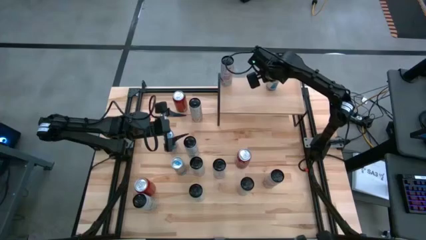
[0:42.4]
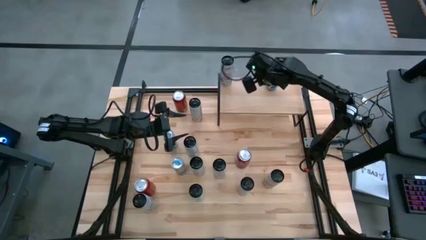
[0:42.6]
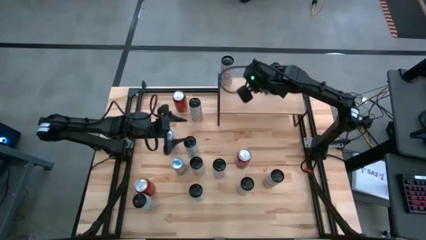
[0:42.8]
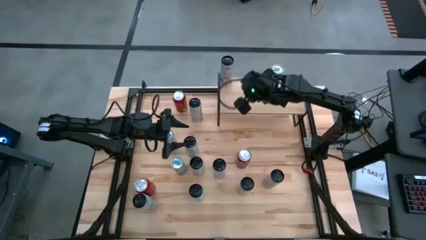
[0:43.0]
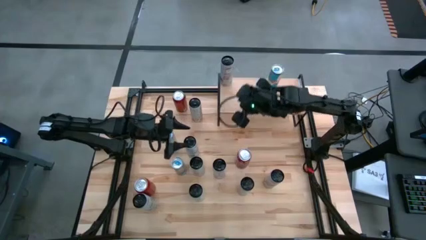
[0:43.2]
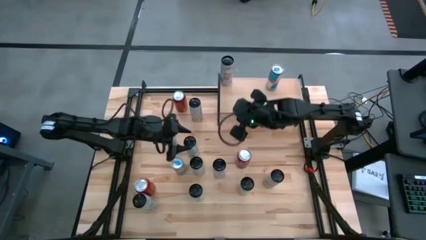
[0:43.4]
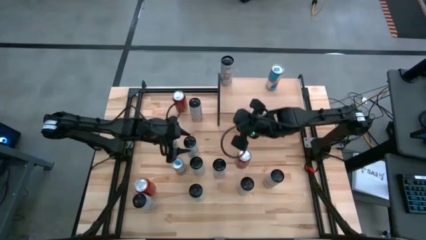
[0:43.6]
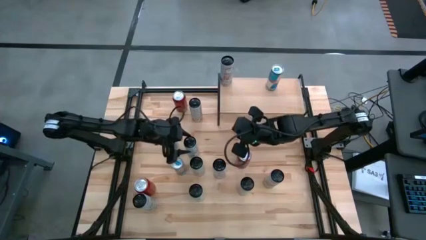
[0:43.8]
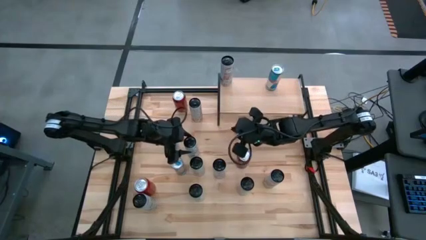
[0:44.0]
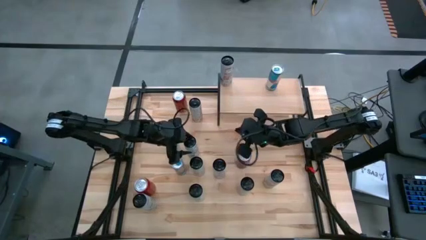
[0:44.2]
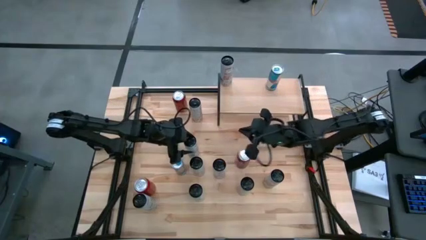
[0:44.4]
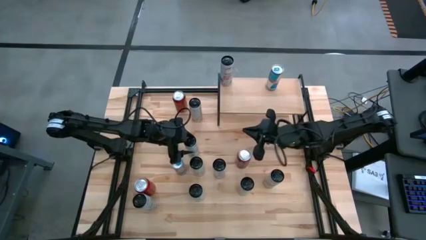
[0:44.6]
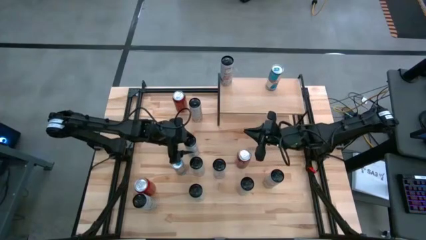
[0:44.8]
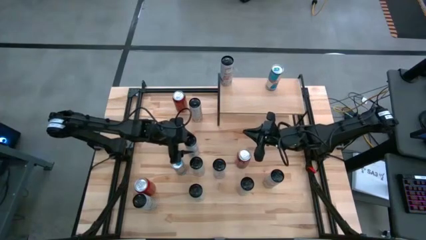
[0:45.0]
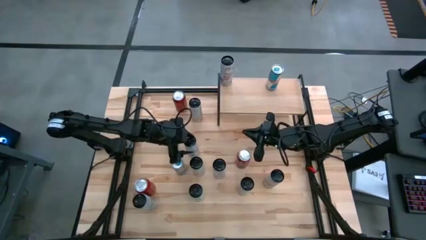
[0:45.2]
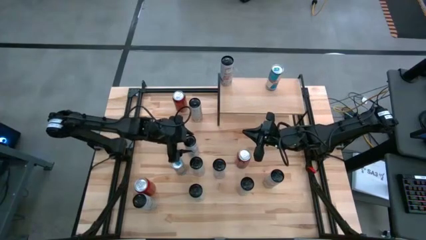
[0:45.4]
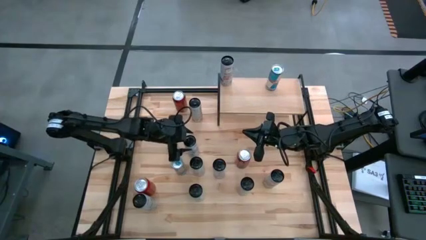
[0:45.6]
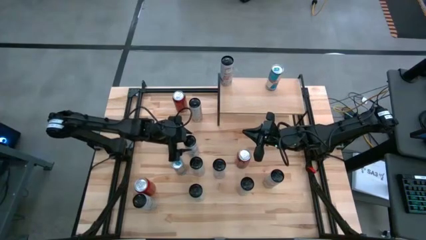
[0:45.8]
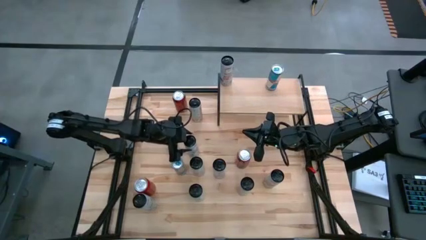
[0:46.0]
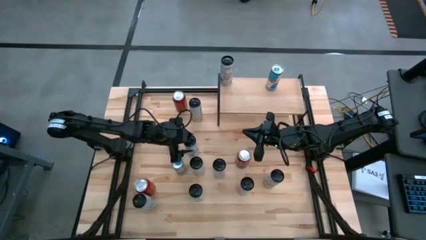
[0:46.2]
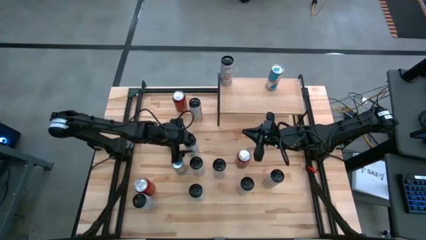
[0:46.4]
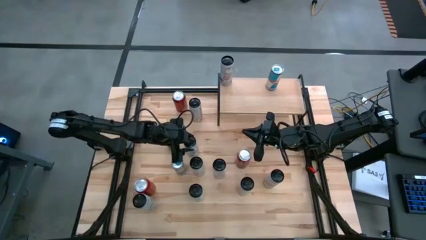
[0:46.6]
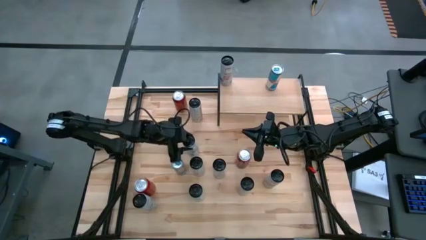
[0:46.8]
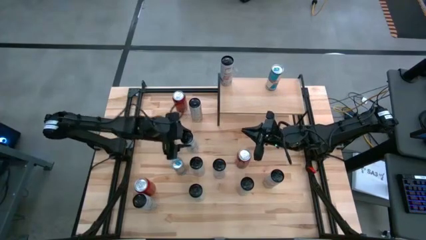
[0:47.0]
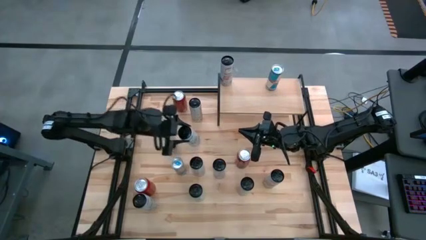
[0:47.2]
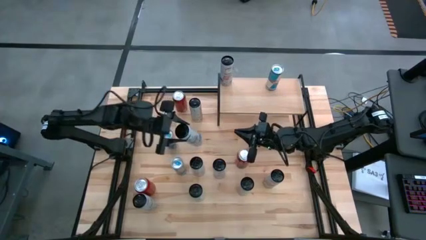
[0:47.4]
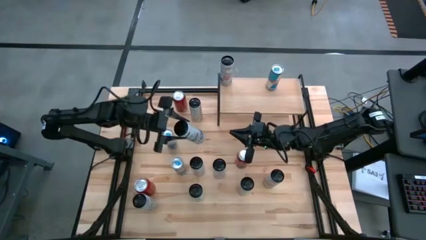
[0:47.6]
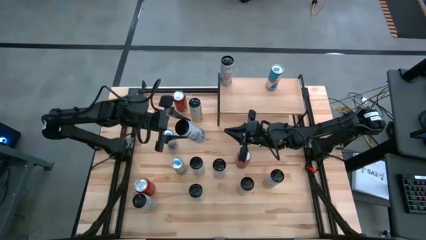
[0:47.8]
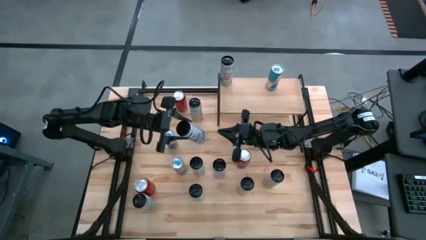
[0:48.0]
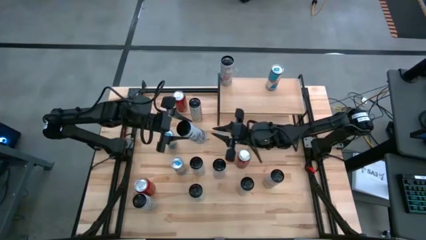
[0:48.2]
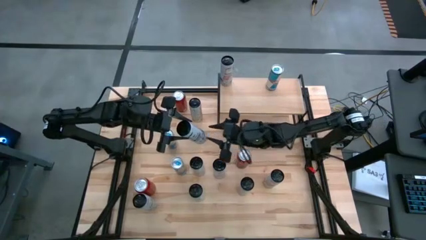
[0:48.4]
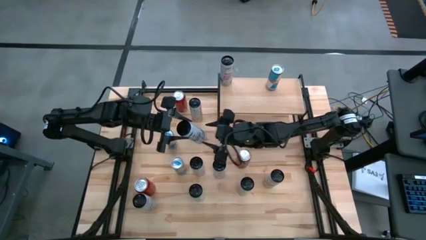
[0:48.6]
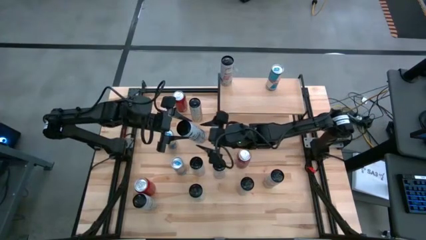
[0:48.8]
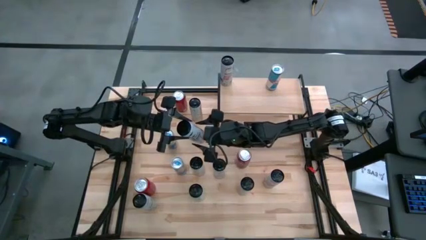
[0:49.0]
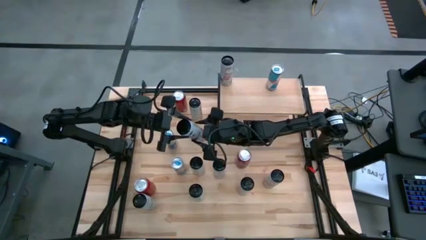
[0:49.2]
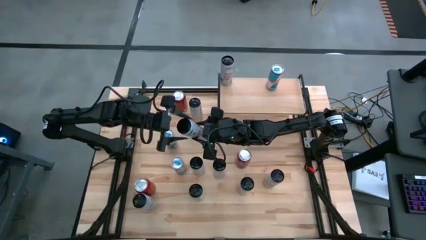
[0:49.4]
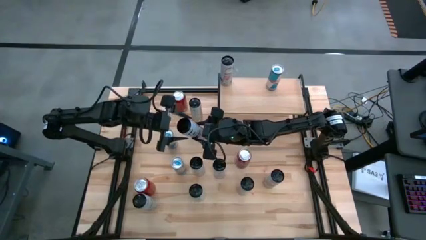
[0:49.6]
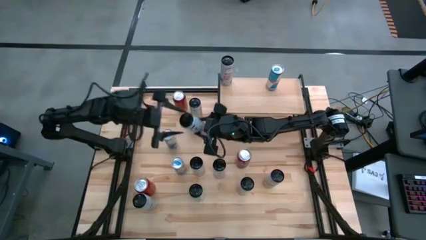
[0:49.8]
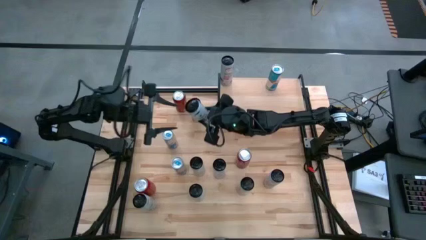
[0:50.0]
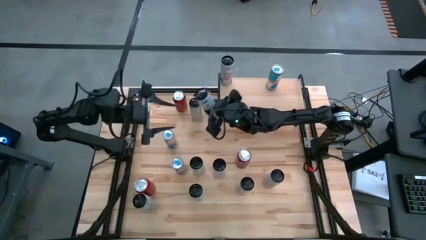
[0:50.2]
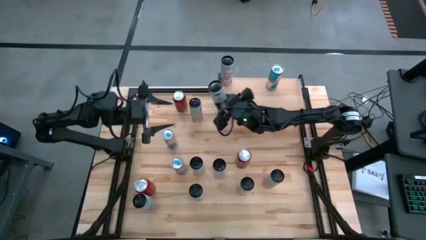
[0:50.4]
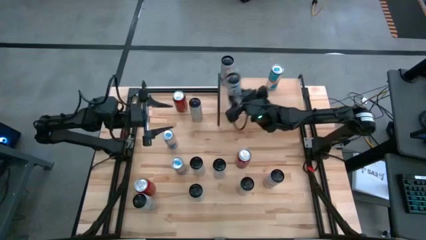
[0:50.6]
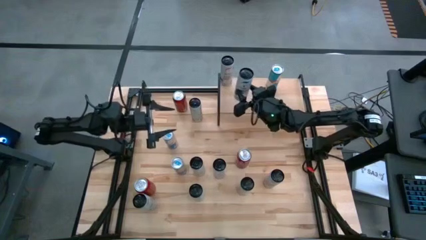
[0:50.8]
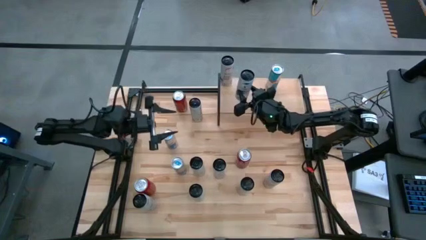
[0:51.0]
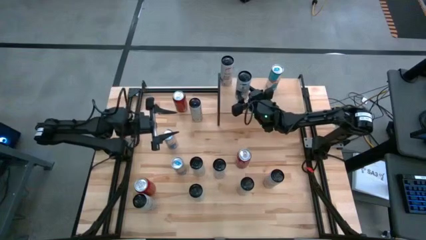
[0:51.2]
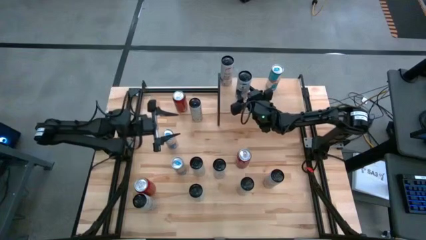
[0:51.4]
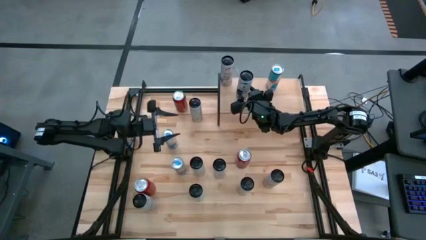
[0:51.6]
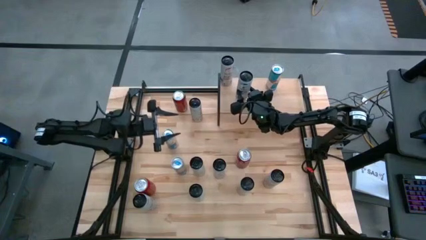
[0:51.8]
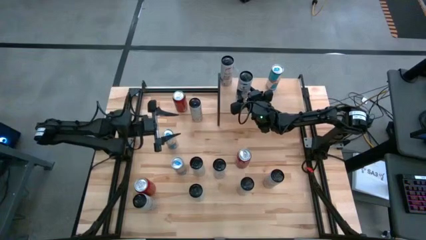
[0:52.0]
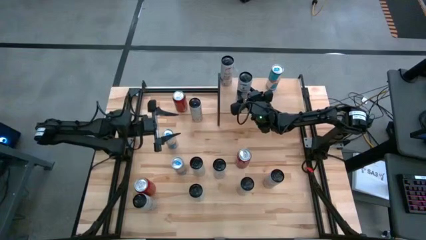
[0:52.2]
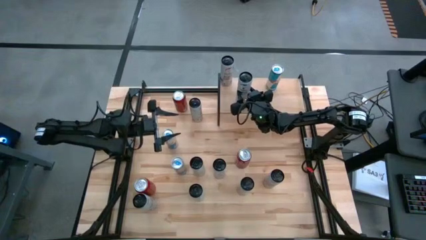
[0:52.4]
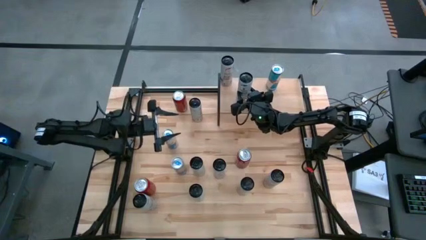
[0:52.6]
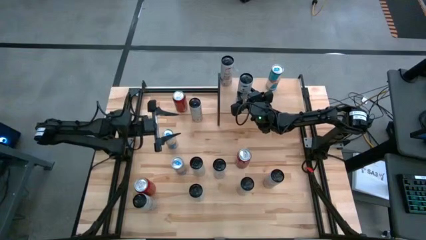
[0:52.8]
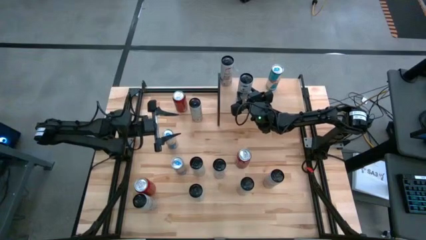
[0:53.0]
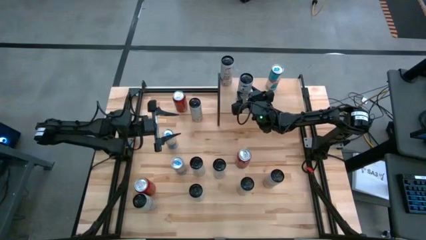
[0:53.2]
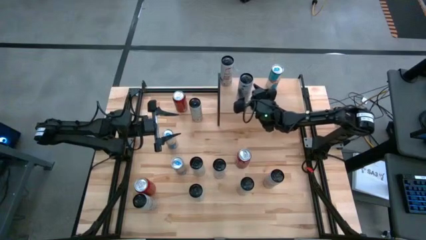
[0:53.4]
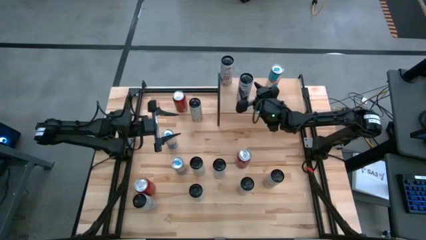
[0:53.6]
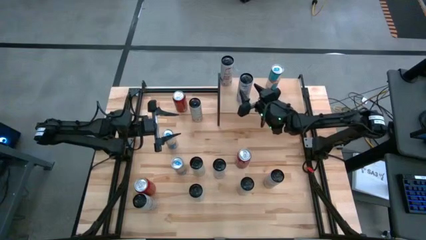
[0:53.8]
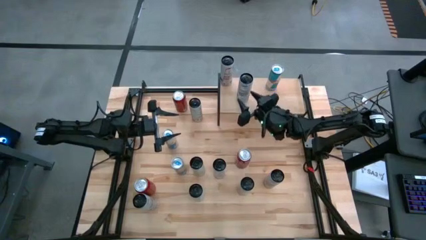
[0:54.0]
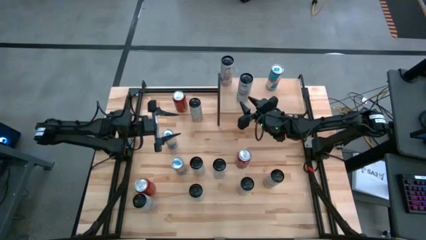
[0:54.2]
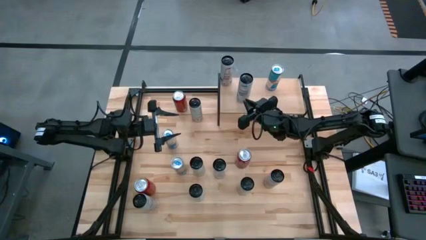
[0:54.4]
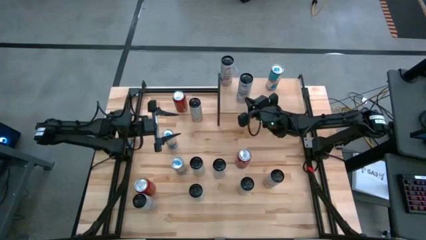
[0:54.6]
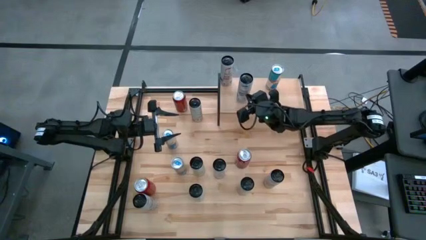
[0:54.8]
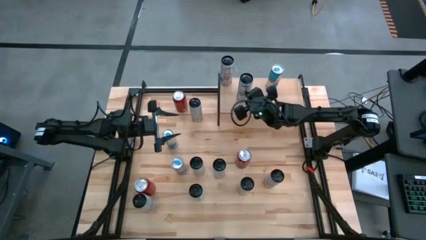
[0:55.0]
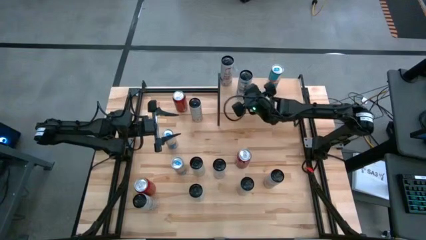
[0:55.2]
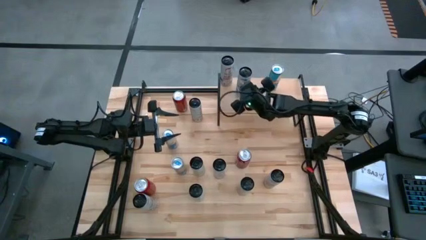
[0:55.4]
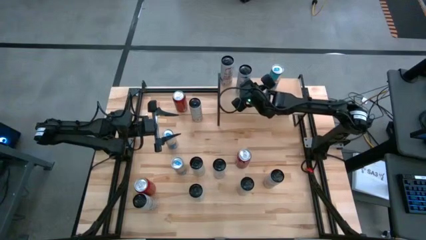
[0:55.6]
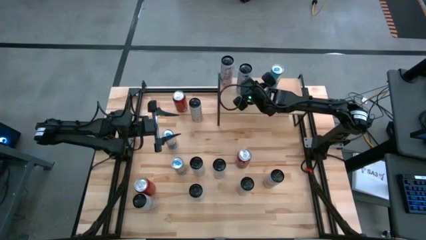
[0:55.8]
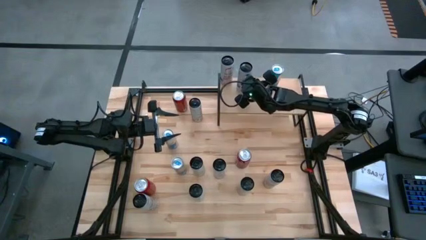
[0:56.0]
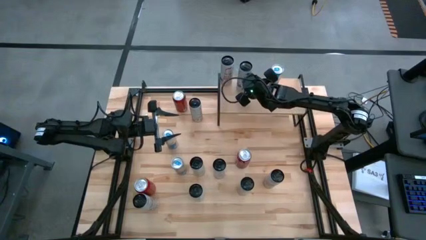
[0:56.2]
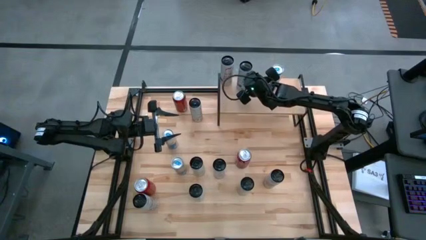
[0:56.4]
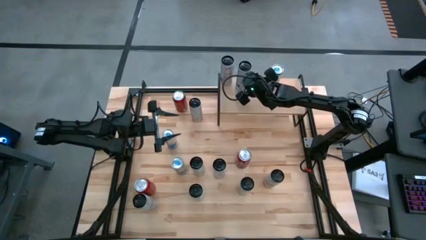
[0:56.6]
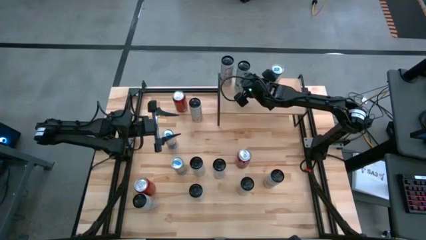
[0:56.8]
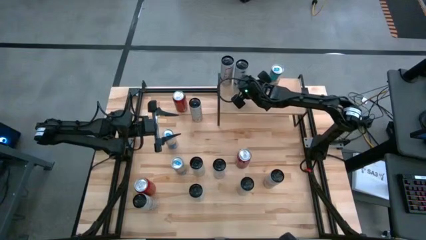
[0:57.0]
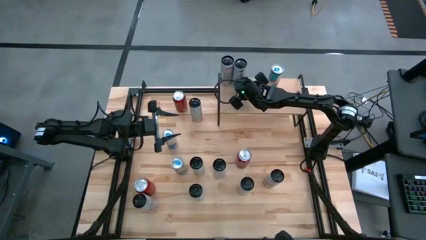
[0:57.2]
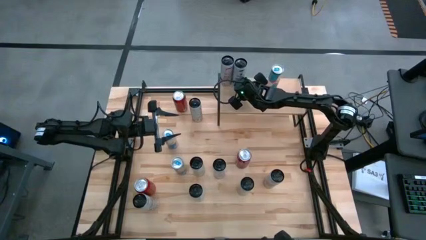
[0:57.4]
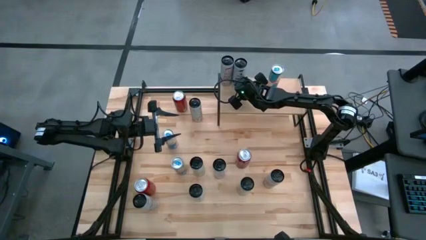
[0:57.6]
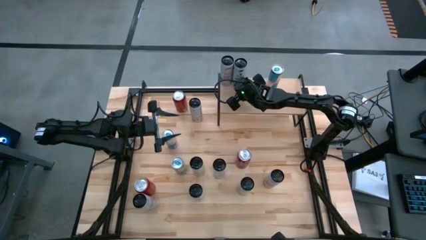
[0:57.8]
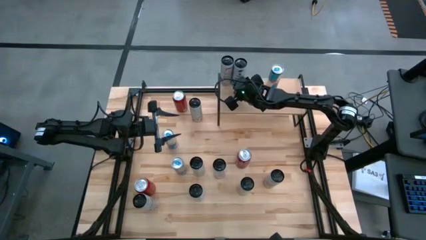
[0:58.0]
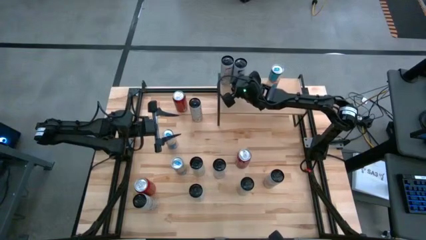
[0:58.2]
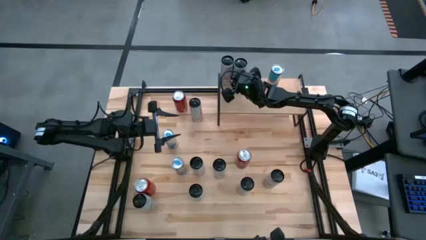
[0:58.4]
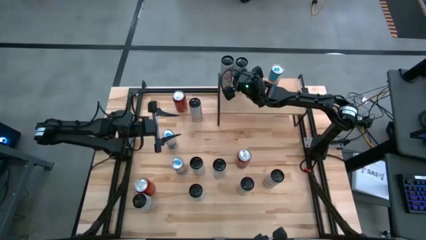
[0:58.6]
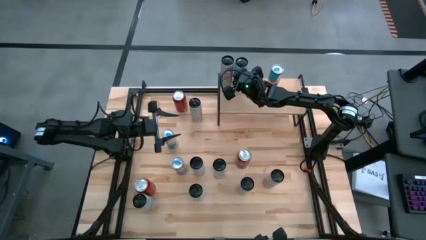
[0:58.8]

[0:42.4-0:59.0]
Task: Place canned beverage on shelf
Put the top white blue soda can on the shelf
